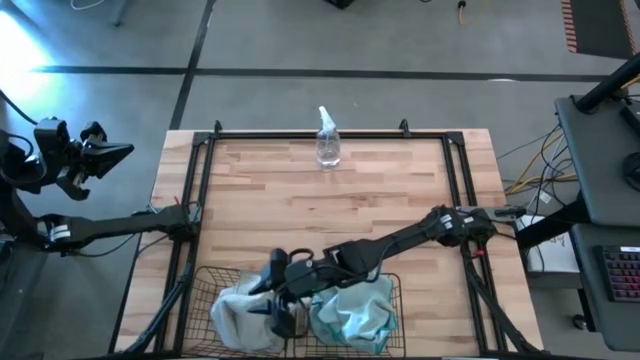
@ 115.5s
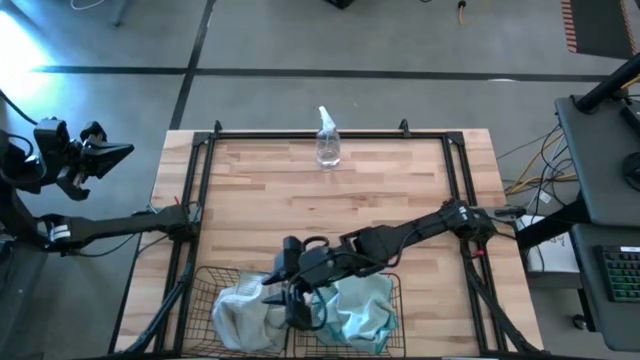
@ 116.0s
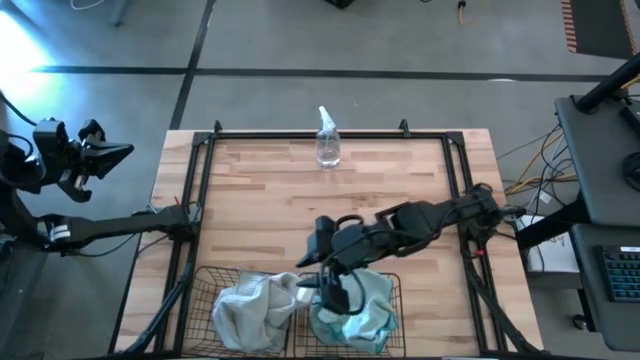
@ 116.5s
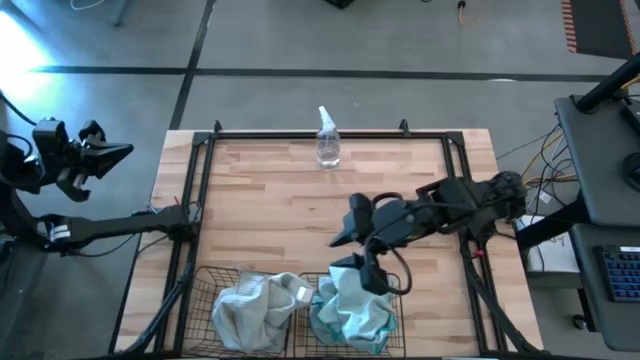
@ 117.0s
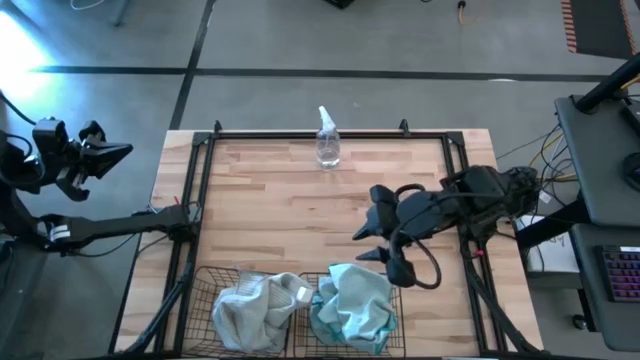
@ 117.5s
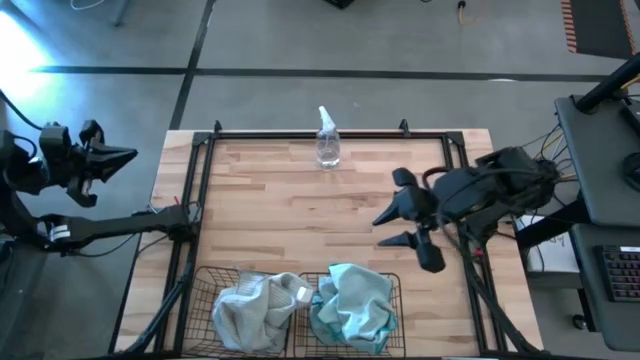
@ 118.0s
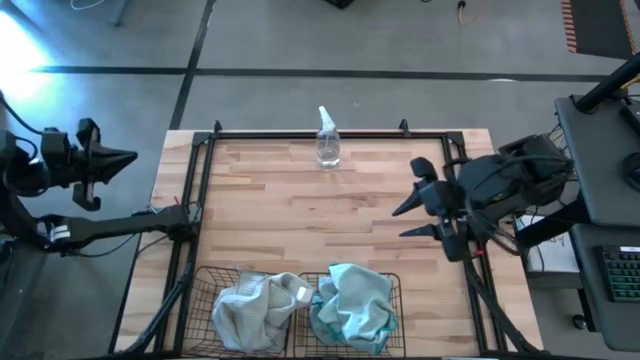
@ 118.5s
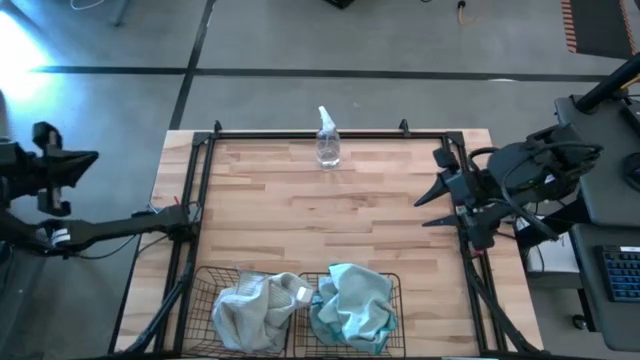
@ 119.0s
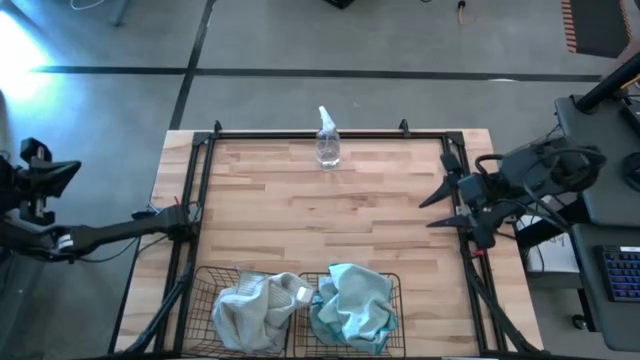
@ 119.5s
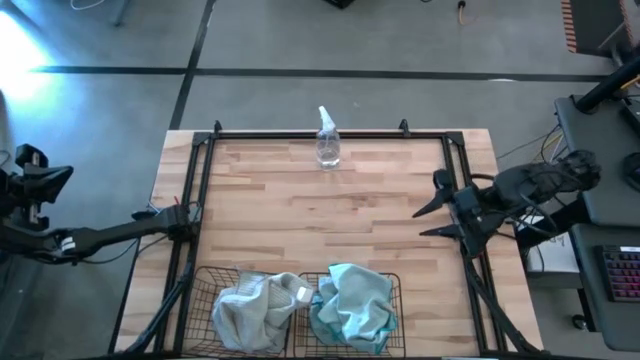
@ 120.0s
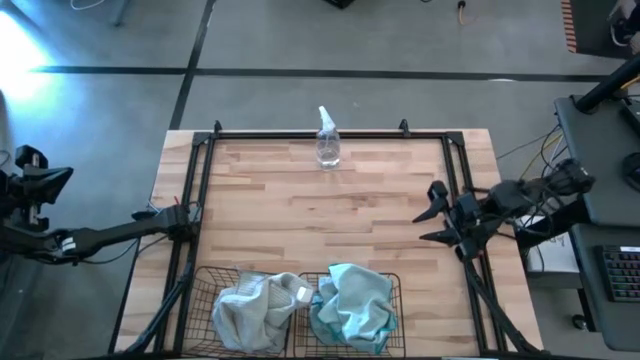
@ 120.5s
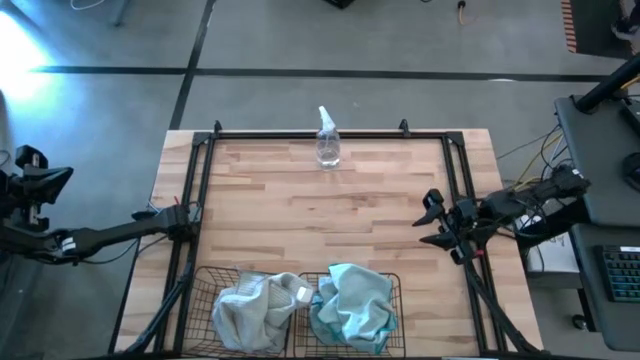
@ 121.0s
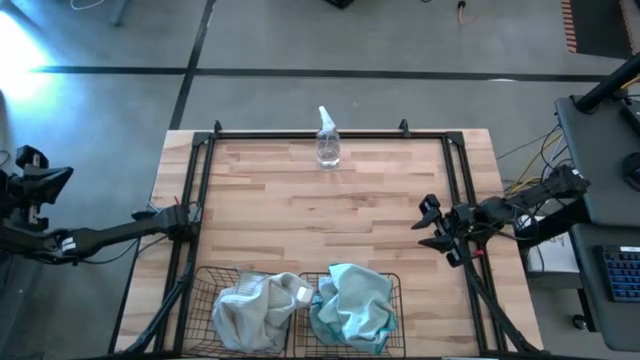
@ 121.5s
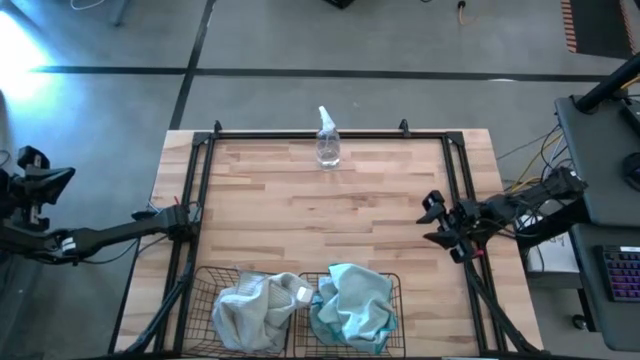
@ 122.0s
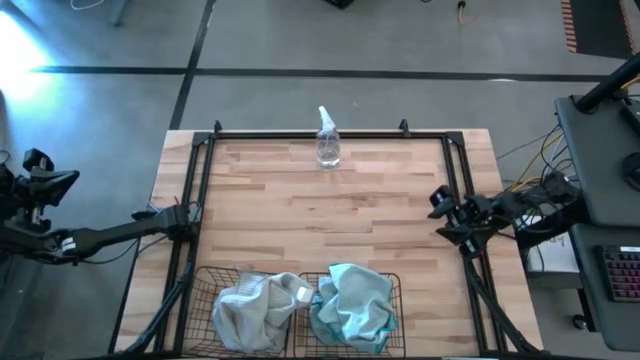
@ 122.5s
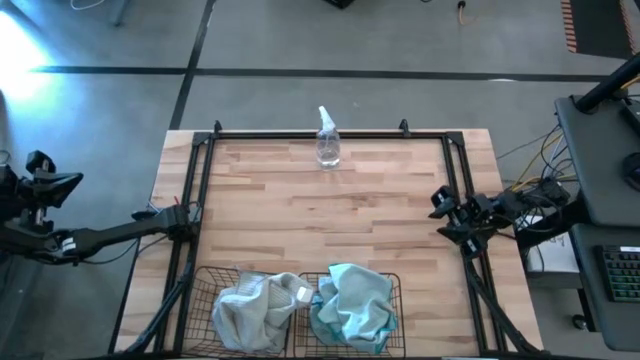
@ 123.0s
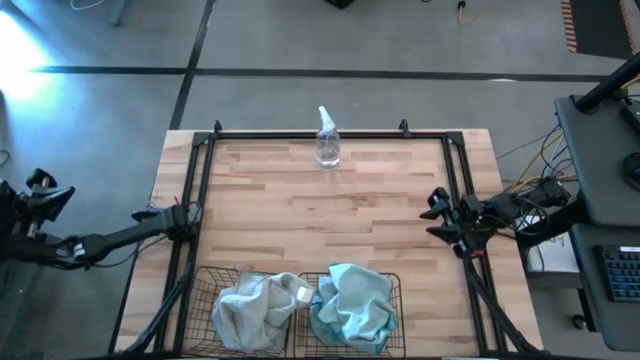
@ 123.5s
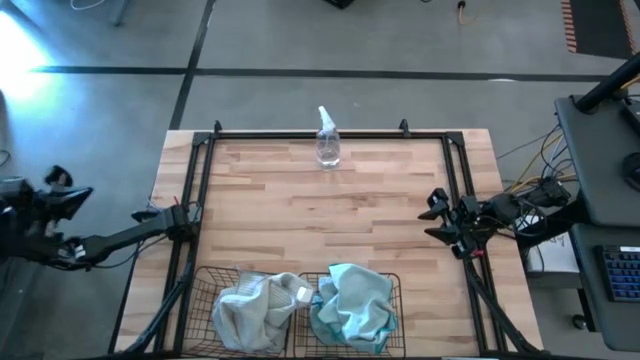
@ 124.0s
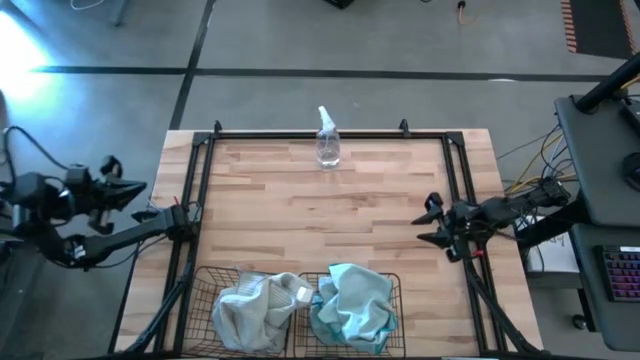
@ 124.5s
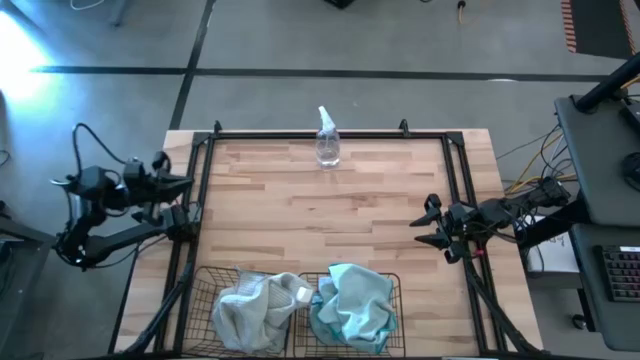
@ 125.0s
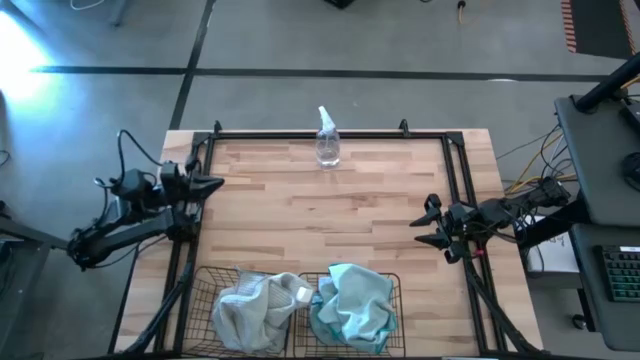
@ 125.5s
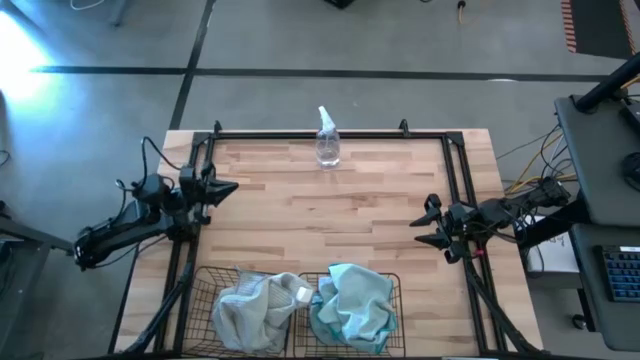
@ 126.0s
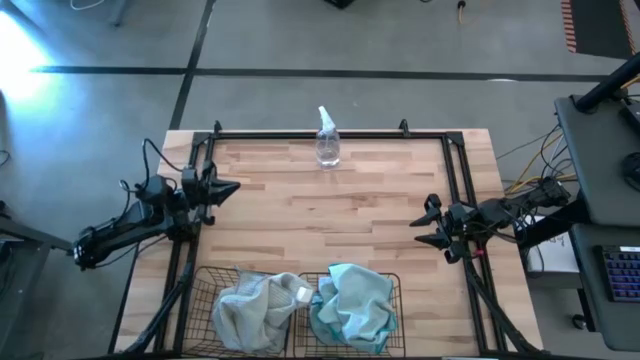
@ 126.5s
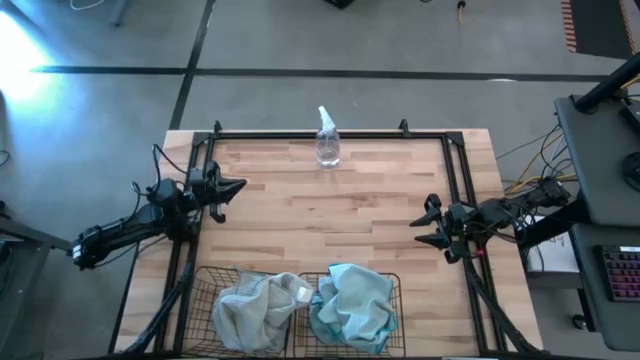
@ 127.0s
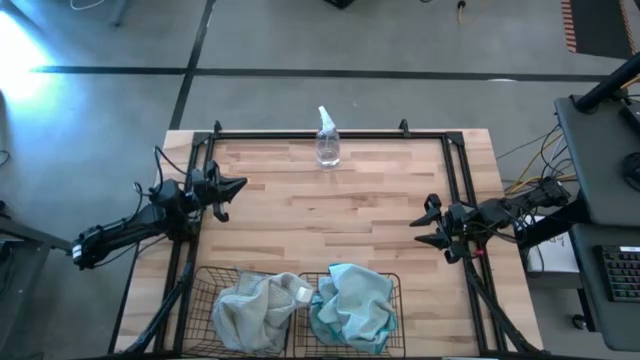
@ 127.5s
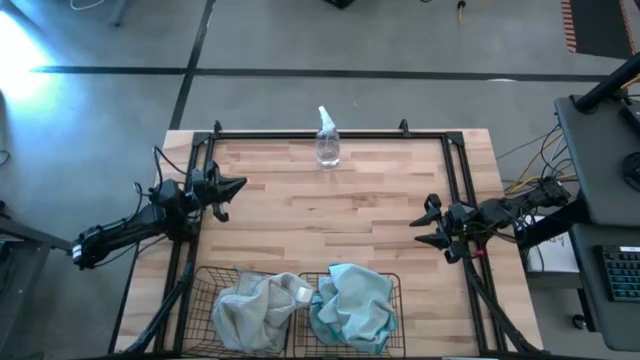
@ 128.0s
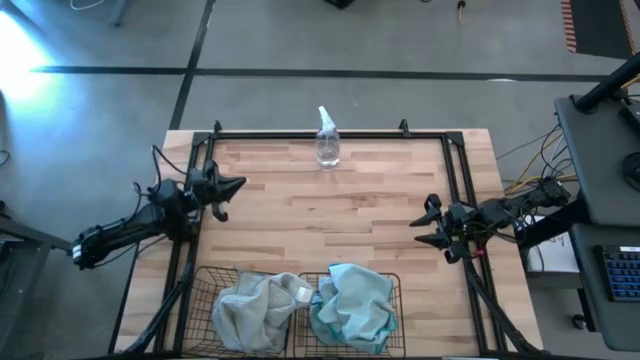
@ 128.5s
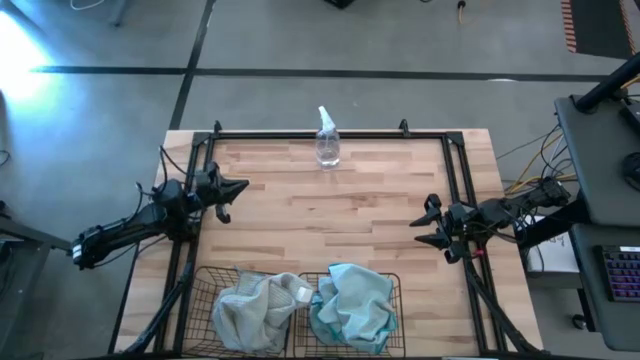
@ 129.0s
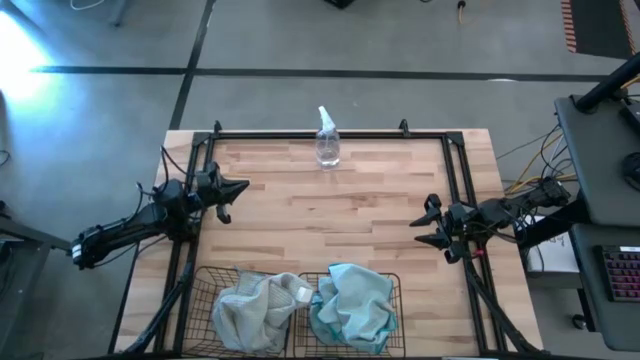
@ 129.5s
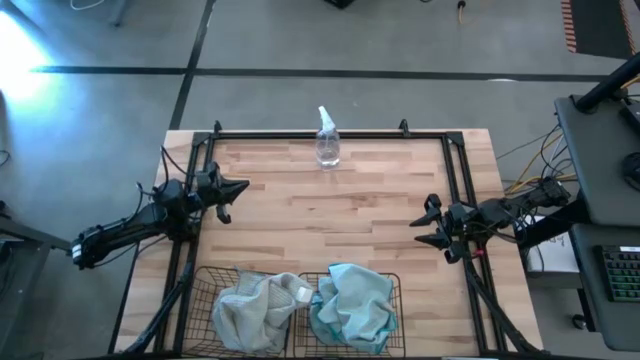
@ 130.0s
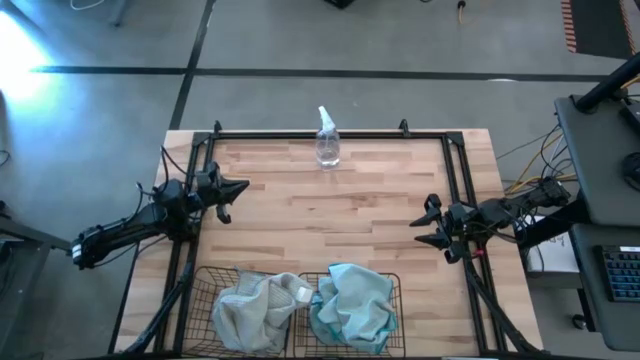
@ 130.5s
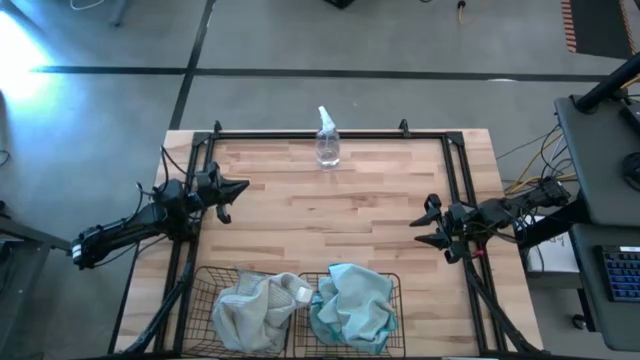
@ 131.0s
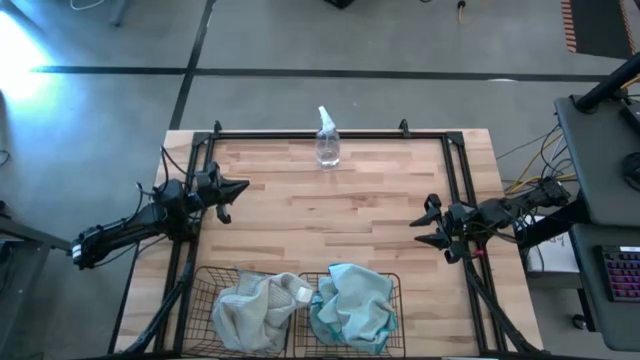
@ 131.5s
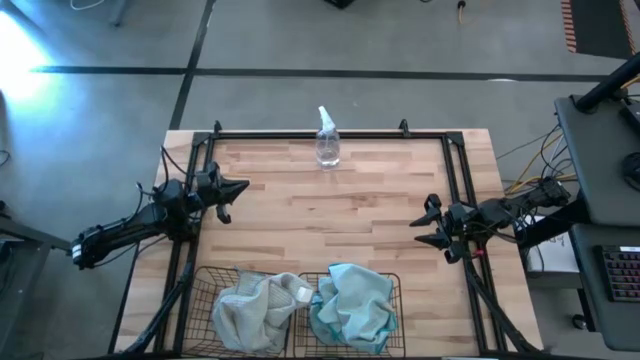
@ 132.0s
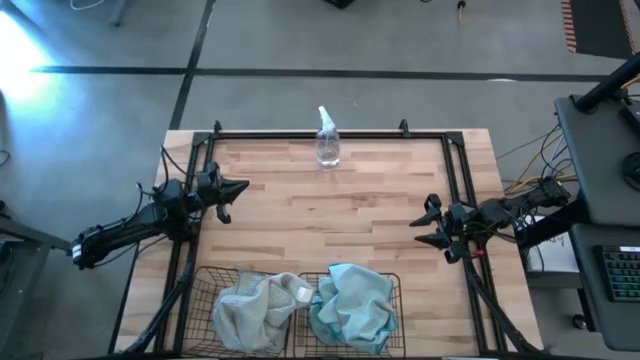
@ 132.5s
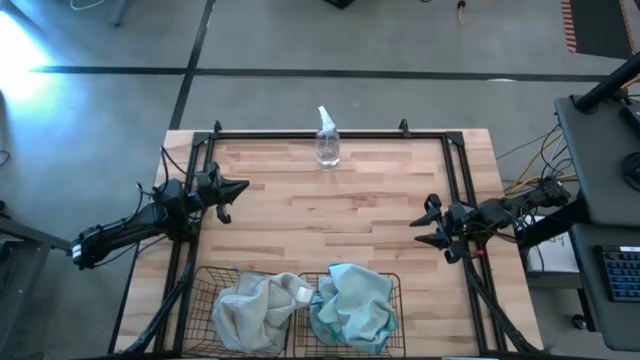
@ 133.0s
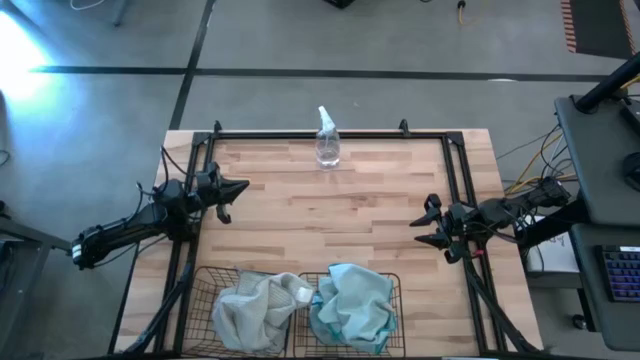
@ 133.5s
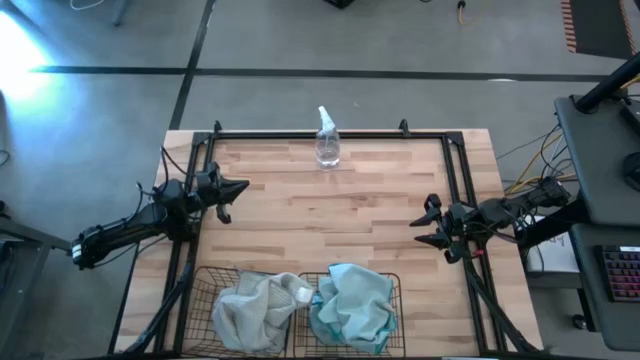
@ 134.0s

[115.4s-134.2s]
Task: Sort microfiber towel by color & place in baskets
Return to Home Position

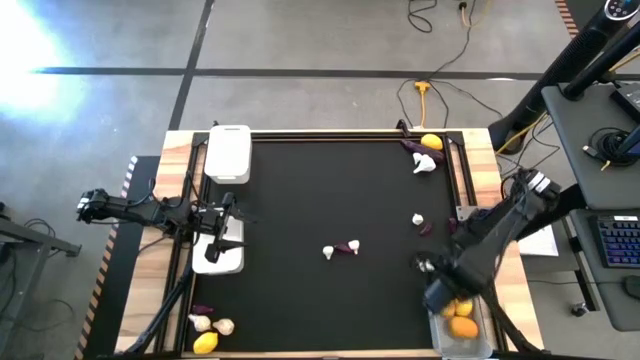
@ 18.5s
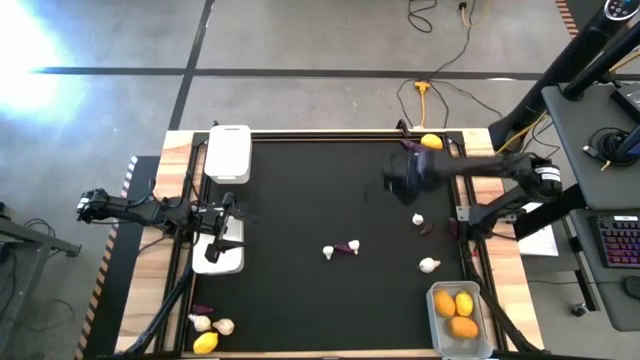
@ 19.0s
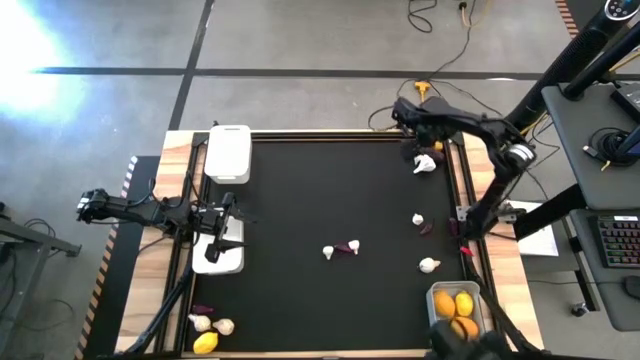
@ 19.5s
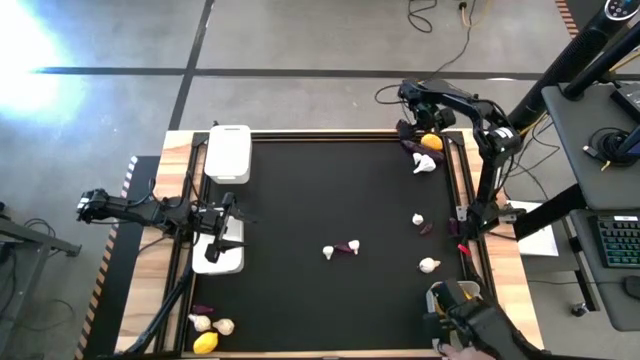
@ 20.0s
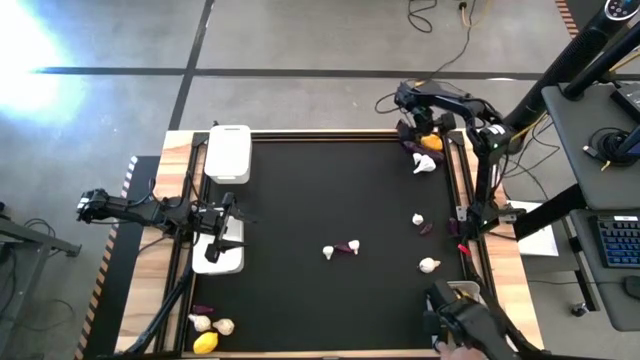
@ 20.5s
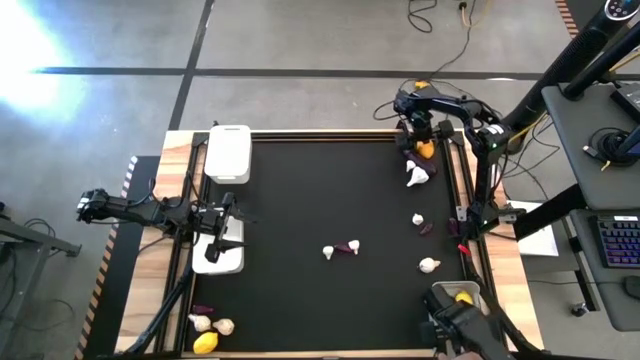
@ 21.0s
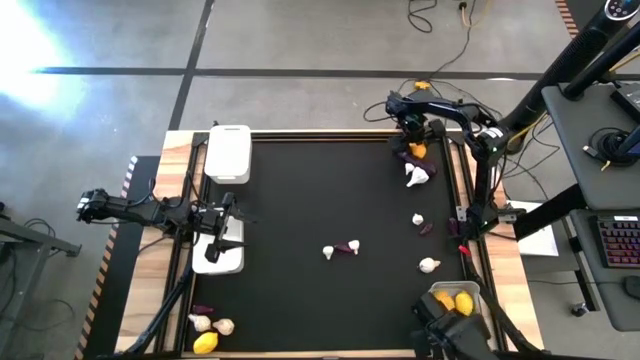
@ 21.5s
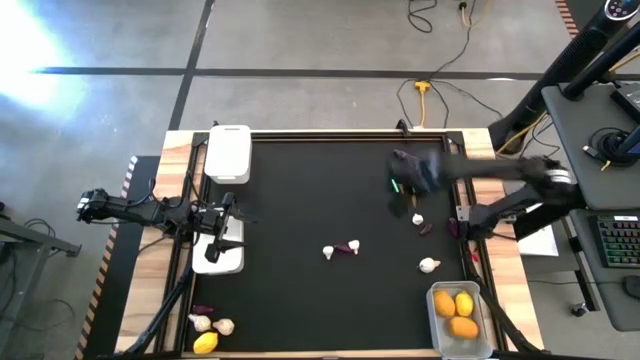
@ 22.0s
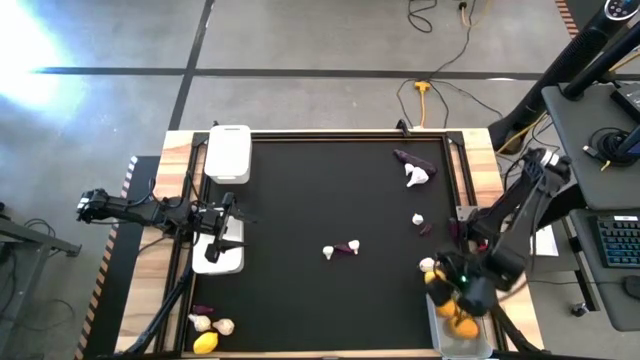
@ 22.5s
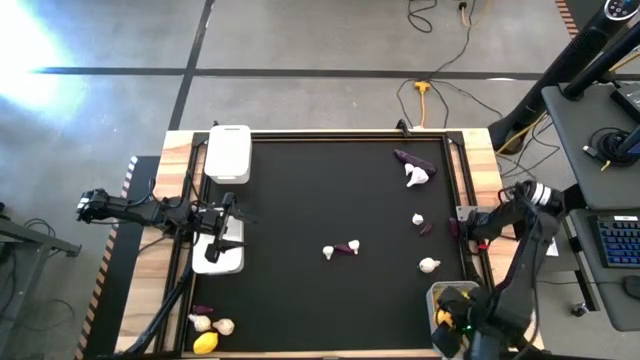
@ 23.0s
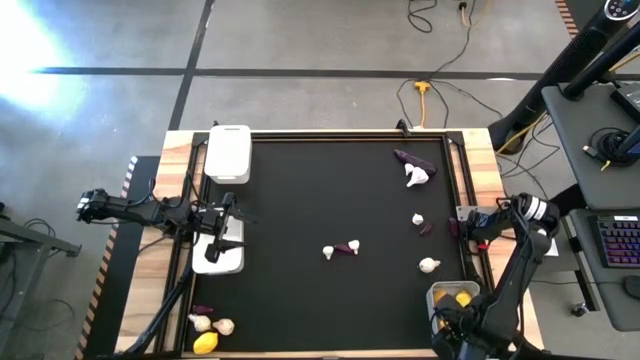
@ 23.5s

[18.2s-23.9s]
Task: Sort produce into baskets
Put the lemon into the gray bin
